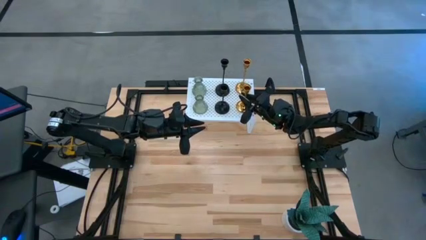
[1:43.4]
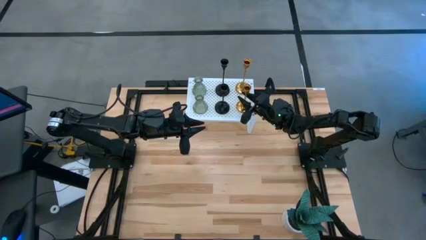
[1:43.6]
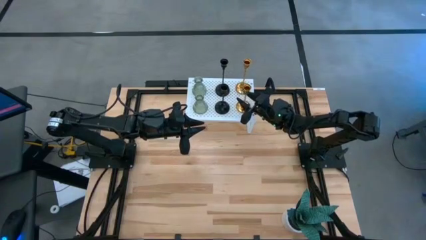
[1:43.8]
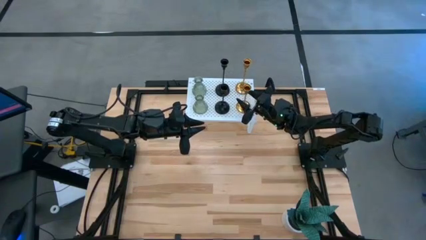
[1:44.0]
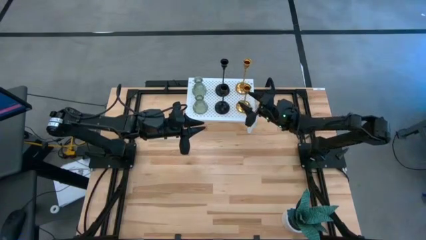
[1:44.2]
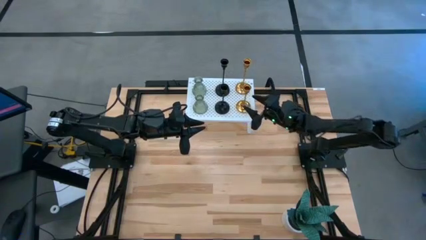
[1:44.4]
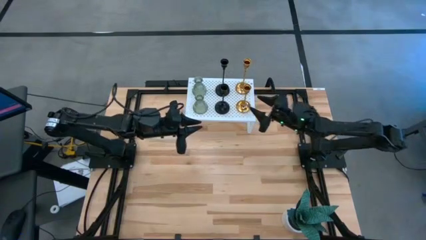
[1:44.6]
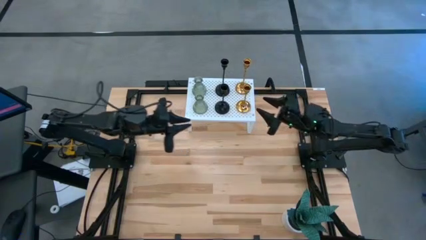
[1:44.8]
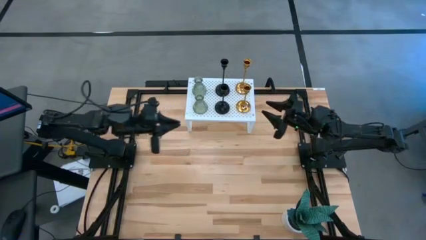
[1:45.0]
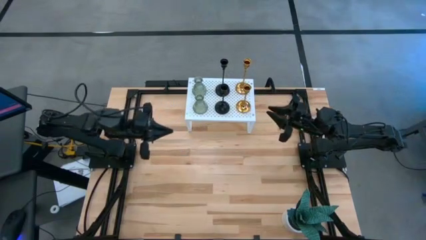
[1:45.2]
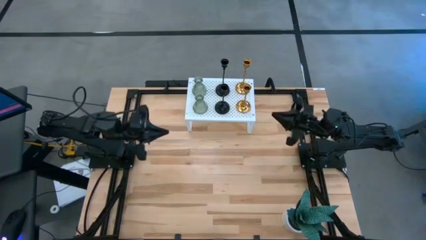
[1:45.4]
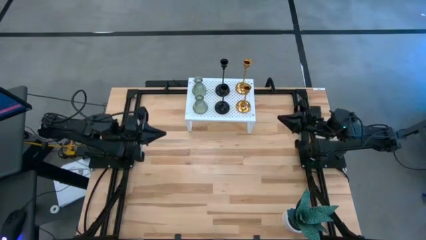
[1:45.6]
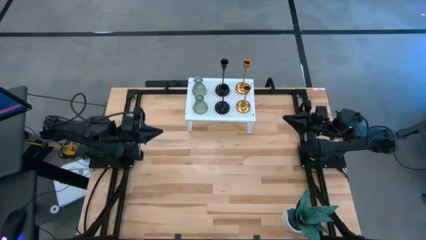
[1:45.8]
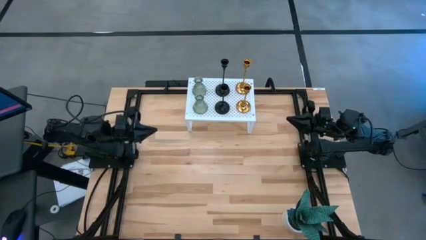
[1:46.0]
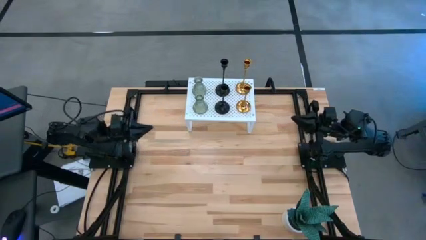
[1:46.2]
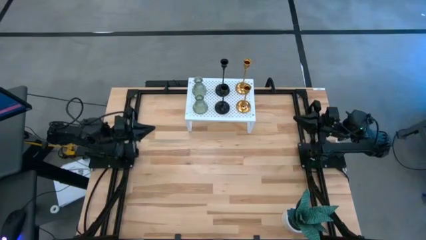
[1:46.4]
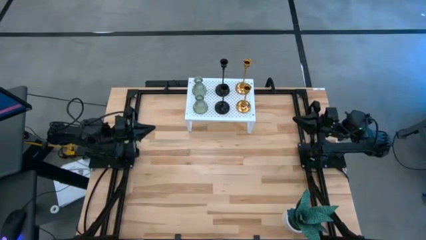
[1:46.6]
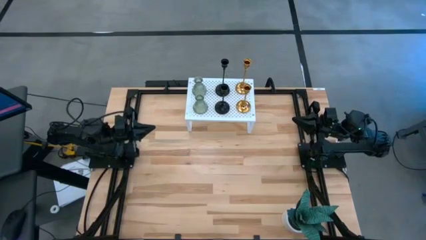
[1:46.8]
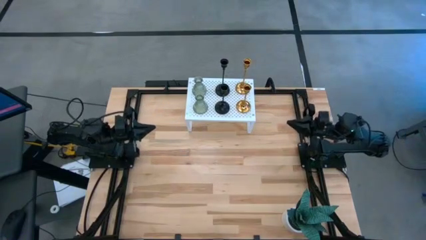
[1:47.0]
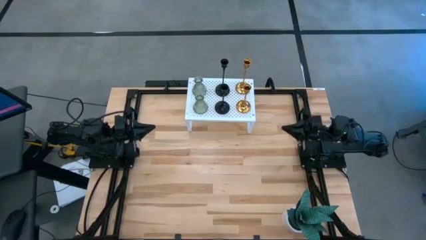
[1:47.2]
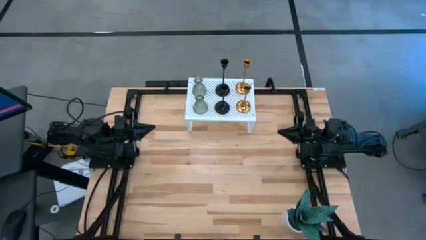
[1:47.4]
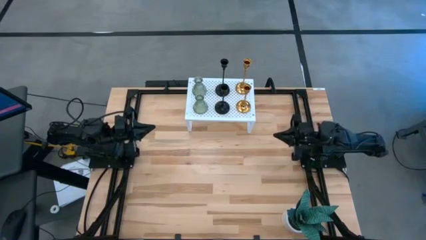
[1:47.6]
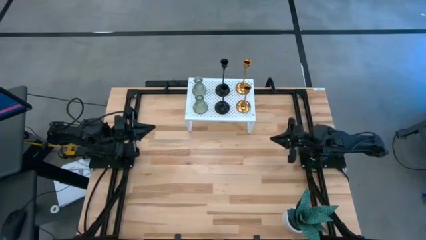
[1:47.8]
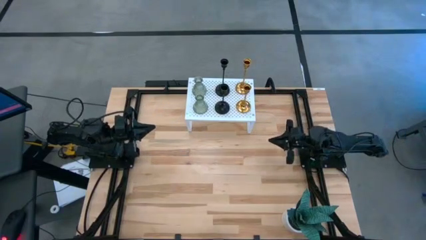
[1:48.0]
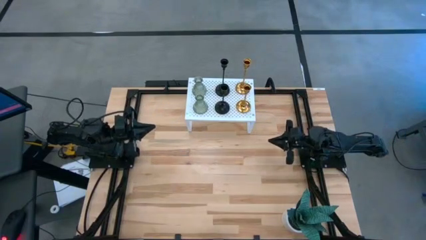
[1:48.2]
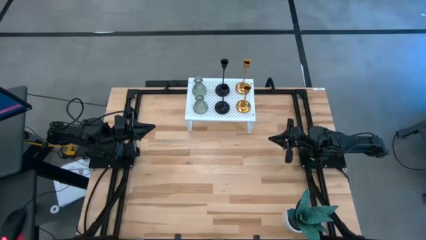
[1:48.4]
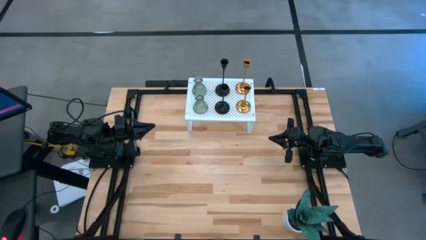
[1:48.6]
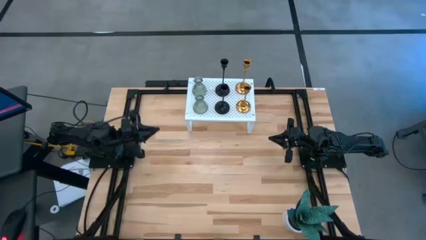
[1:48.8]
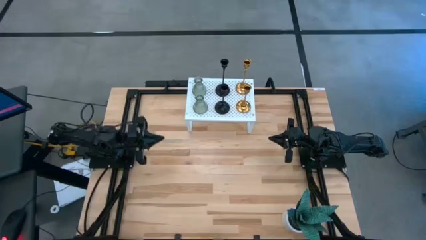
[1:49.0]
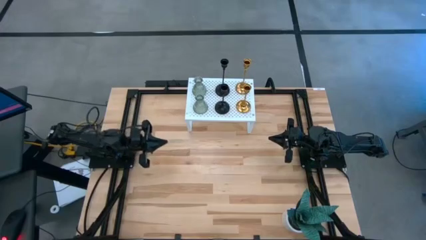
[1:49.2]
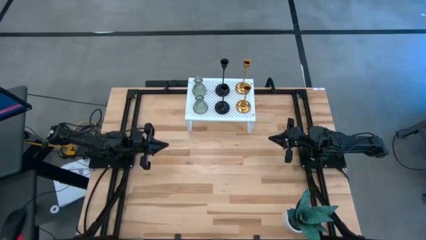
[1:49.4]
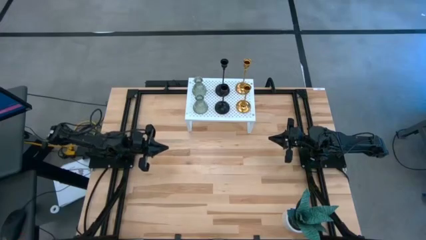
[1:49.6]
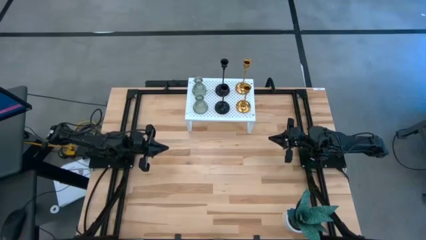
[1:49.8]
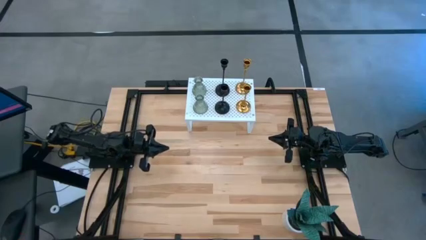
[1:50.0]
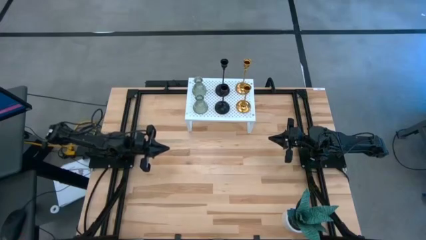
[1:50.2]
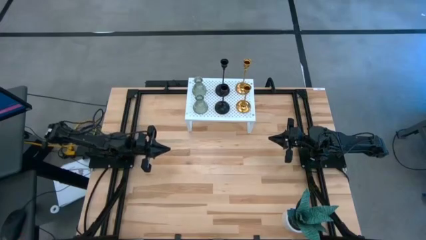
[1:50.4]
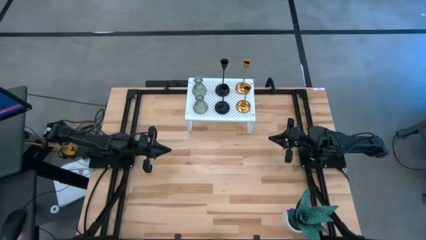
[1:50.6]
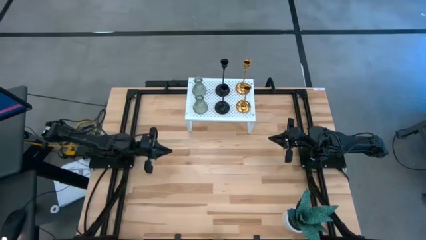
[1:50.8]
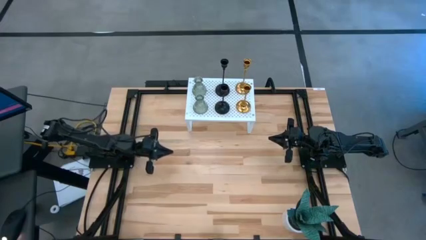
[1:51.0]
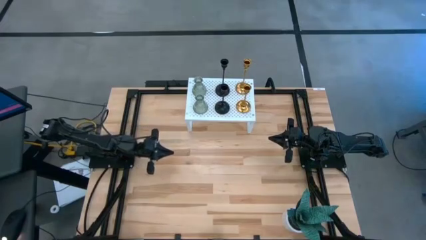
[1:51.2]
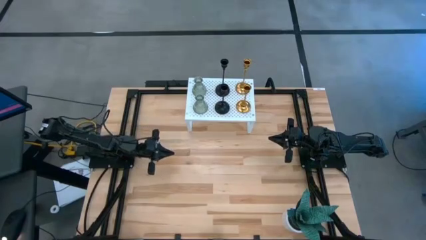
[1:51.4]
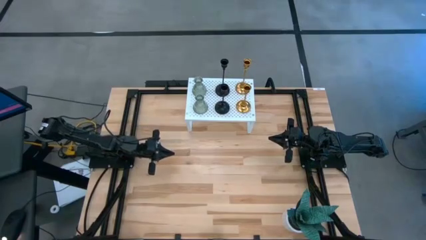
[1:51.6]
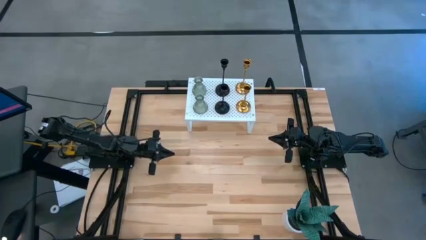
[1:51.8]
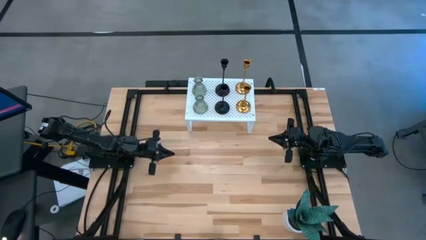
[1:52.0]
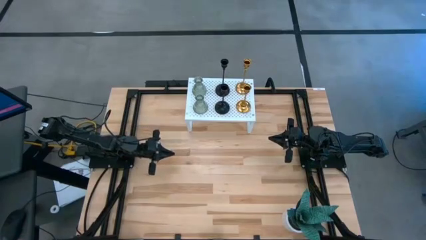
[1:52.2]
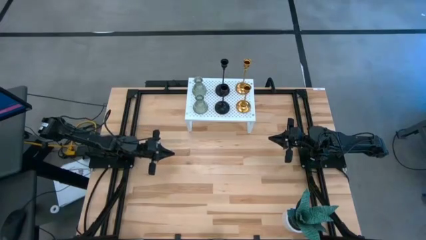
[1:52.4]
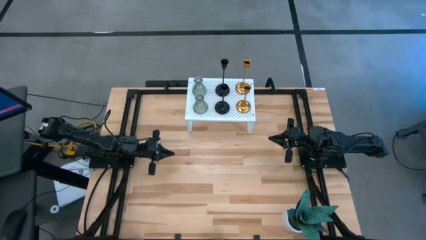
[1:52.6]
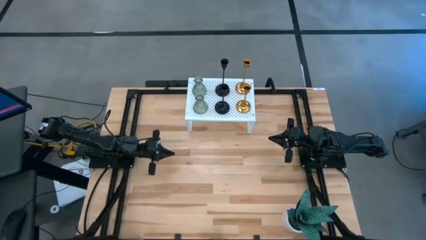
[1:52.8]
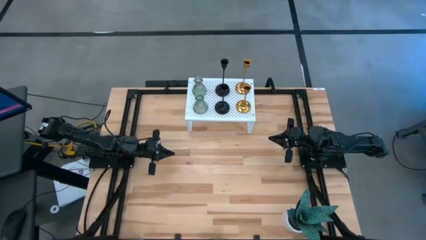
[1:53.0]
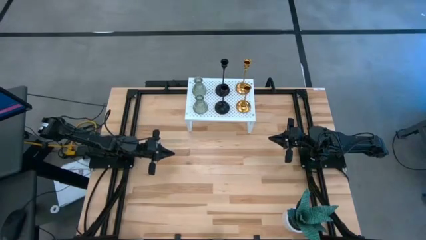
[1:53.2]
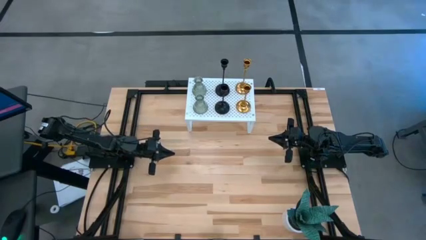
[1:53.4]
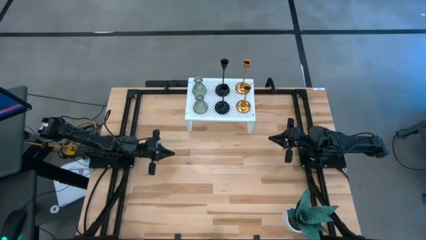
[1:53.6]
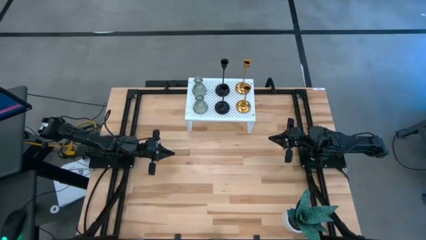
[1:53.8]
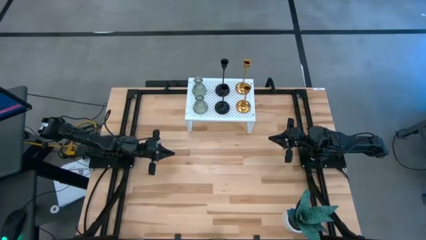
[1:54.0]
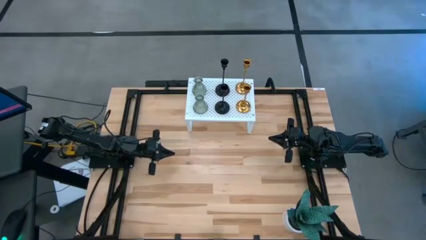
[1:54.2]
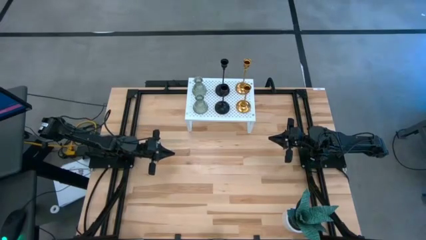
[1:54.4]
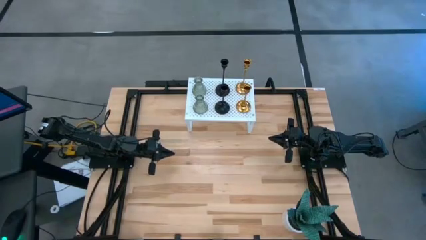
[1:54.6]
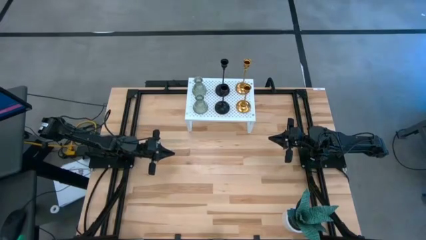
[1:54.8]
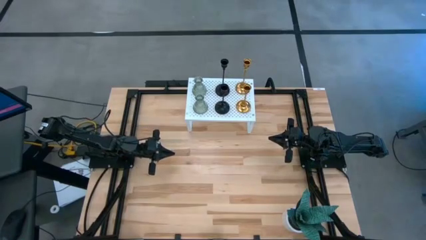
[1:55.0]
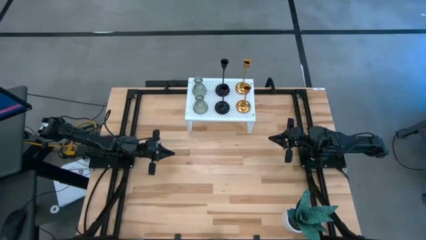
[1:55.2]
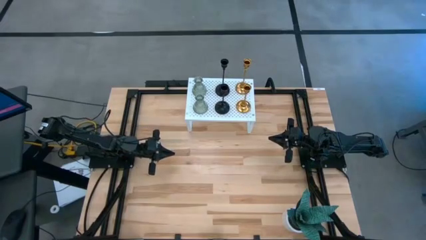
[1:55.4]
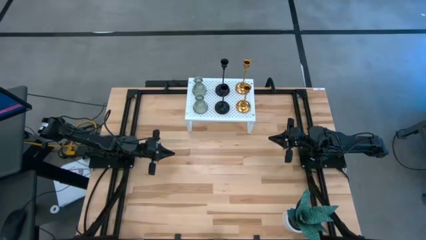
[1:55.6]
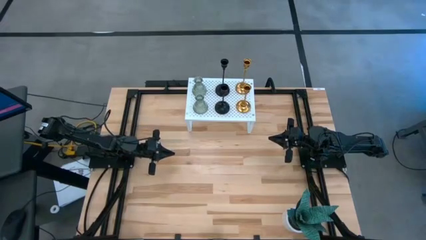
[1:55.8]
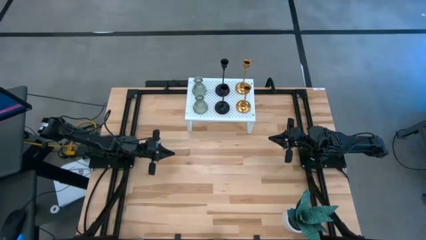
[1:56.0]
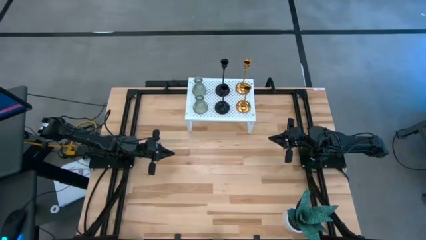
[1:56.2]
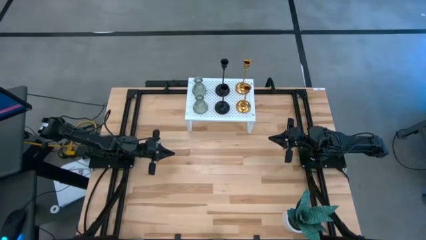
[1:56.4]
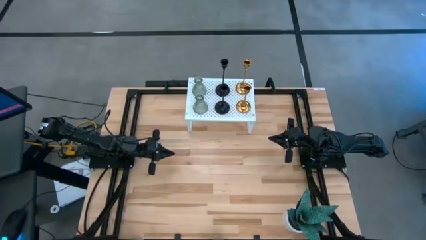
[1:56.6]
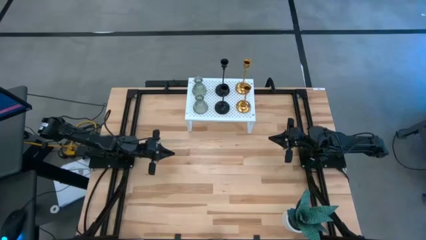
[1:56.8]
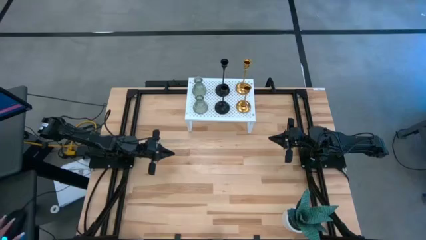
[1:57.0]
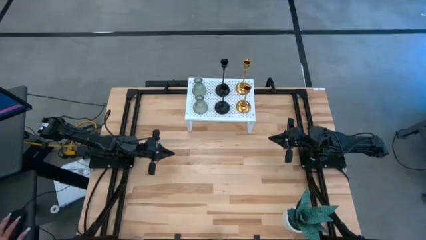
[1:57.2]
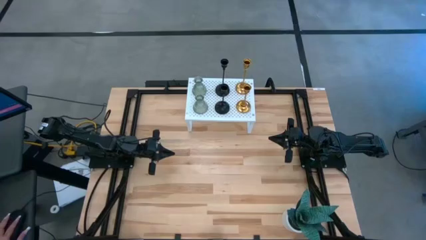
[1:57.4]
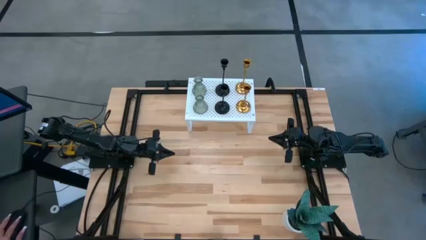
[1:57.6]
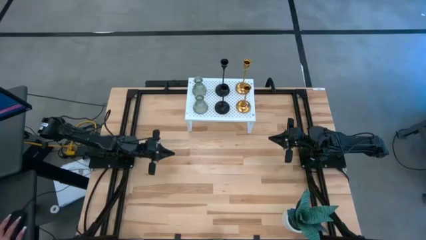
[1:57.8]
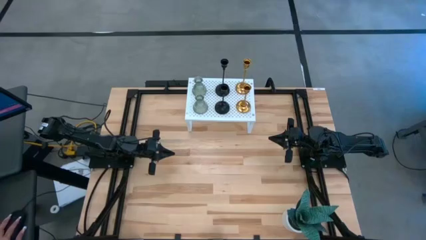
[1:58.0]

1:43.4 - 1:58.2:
Task: Pick & Place candle stick holders
Return to Home Position

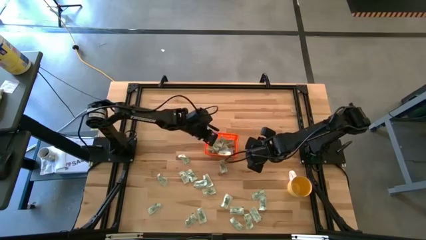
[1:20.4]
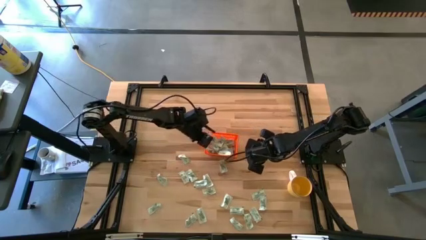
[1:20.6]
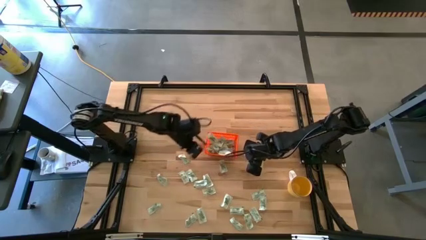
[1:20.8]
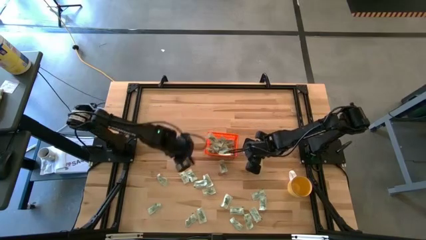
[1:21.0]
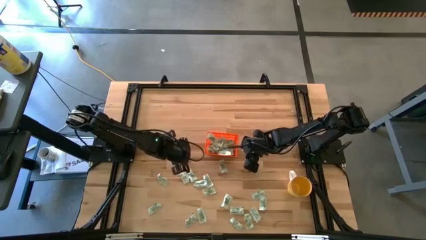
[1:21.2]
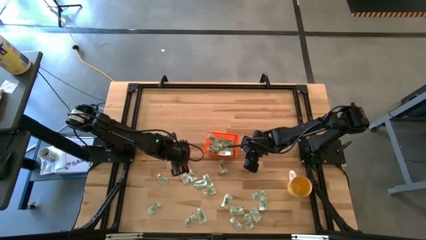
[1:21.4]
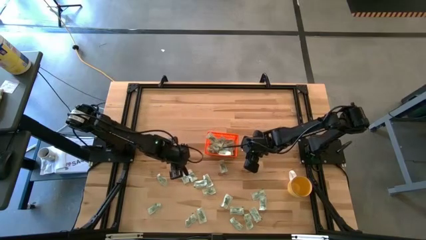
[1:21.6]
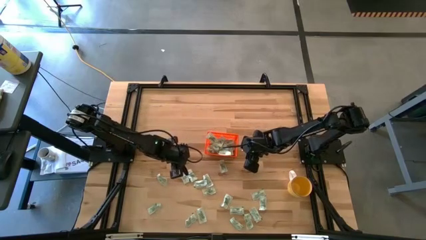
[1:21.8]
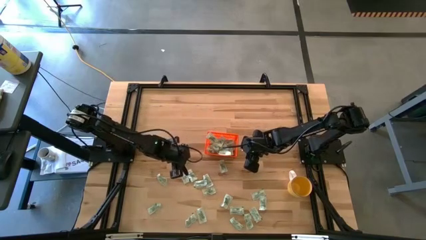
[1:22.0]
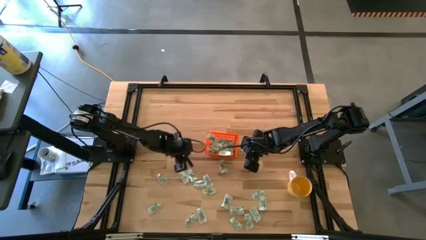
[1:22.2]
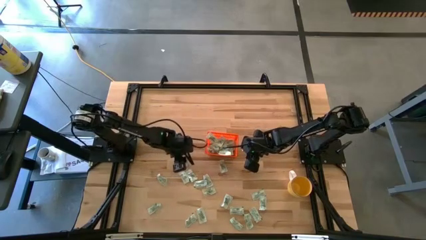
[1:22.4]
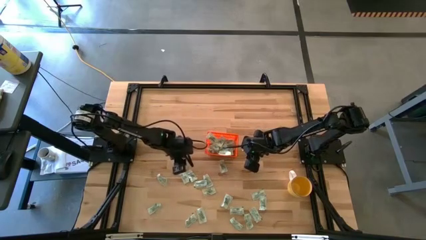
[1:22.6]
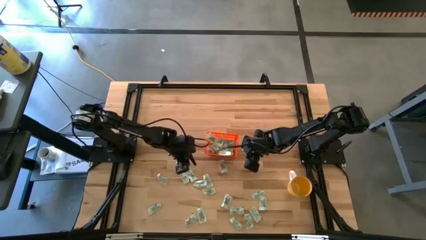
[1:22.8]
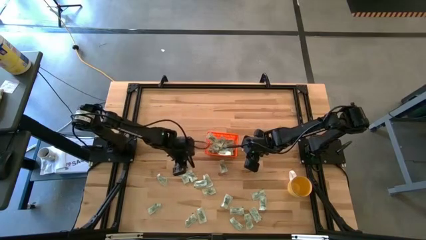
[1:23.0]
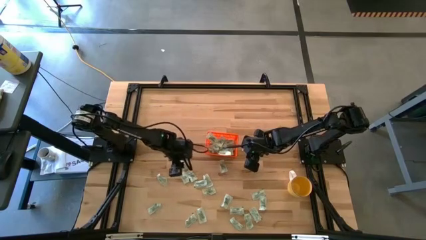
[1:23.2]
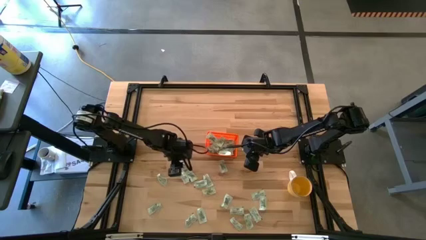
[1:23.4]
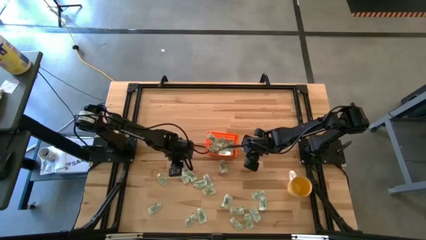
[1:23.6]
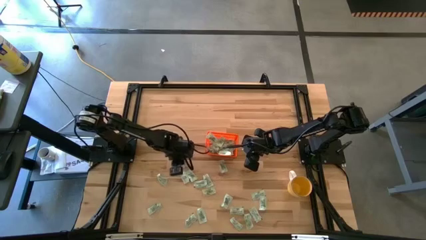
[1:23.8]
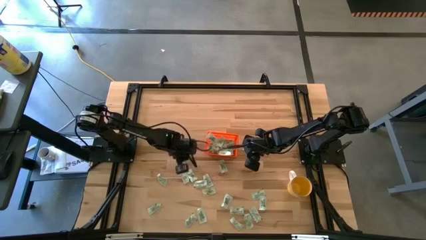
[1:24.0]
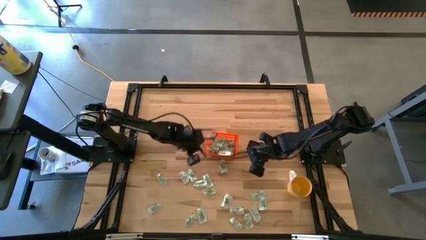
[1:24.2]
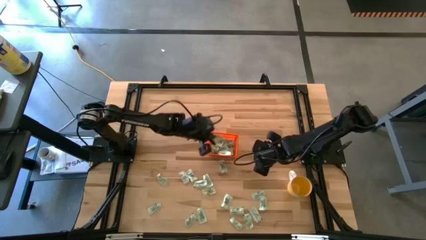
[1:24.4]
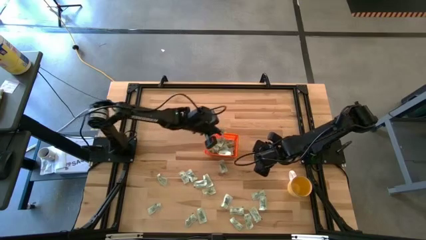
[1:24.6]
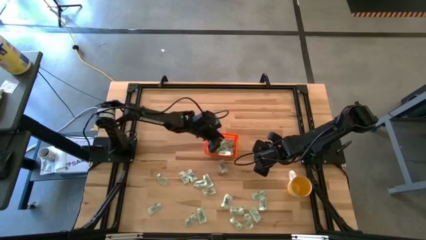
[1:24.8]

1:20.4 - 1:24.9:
Task: Pick and place Stevia / Truvia into bins
Put the light green stevia packet into the orange bin
